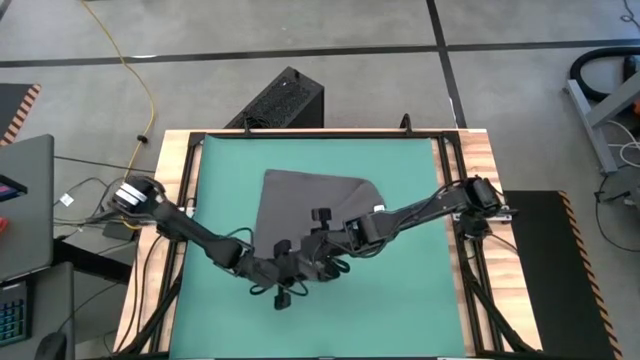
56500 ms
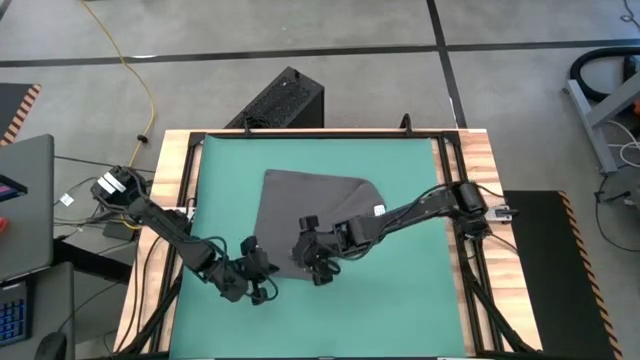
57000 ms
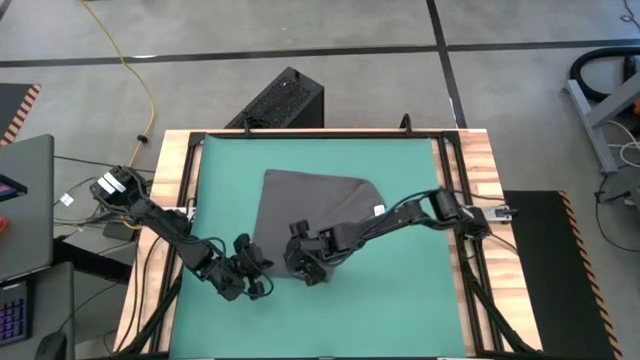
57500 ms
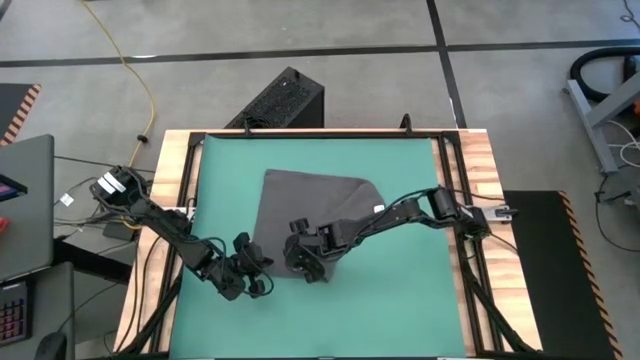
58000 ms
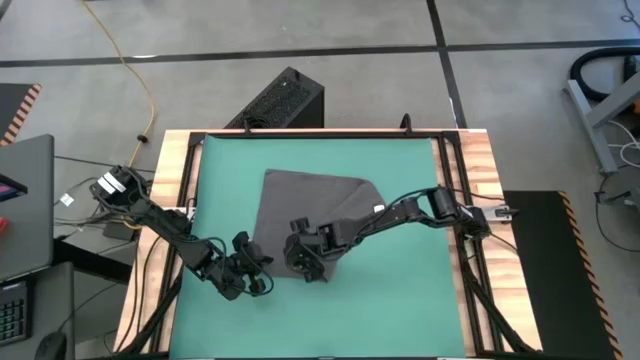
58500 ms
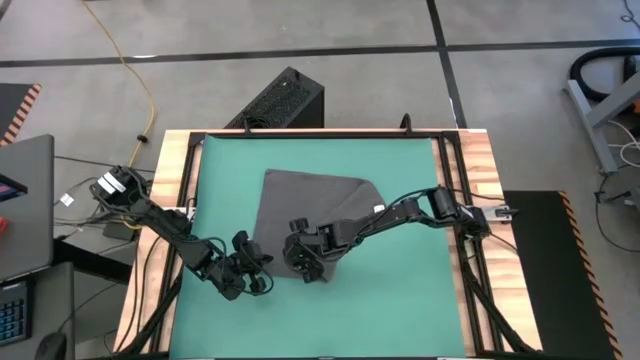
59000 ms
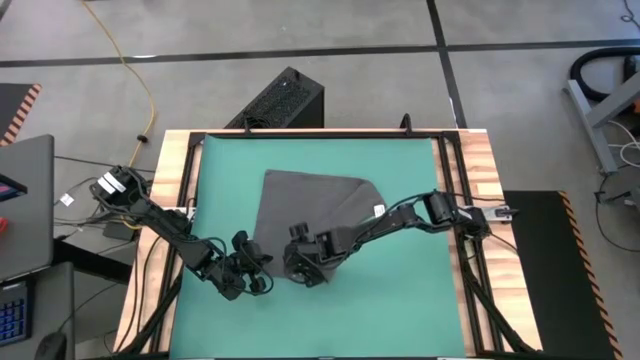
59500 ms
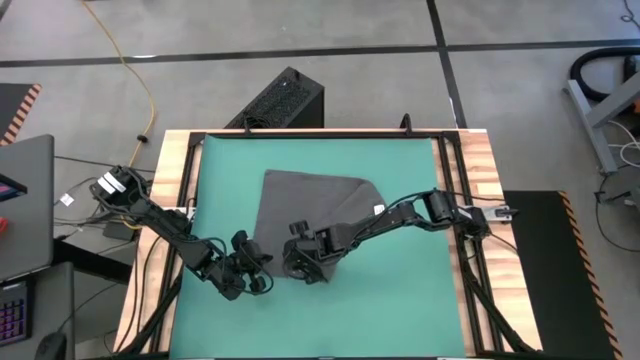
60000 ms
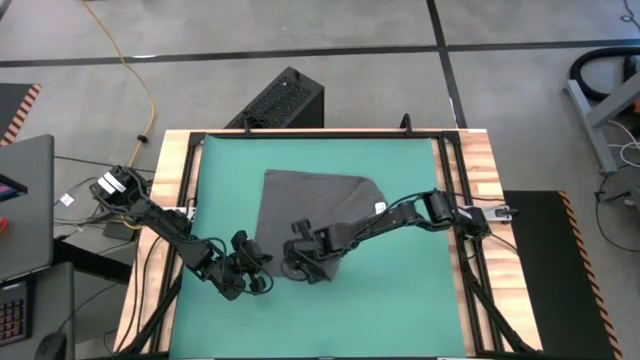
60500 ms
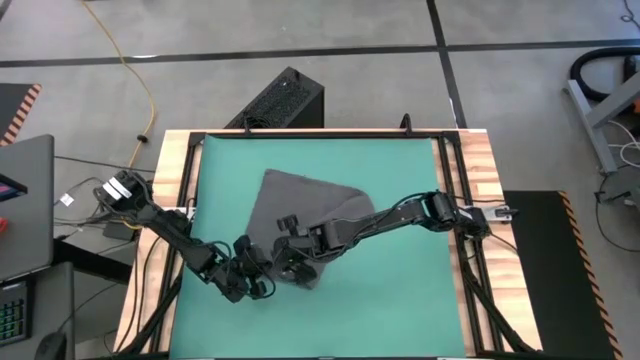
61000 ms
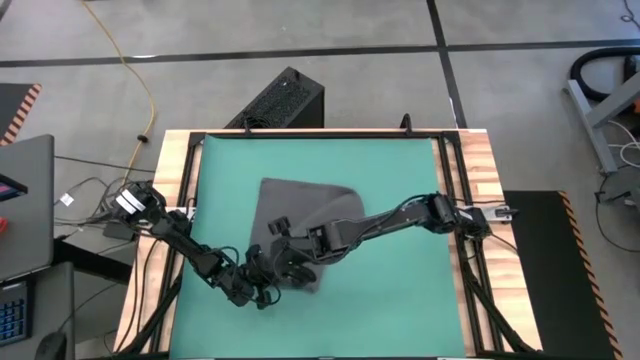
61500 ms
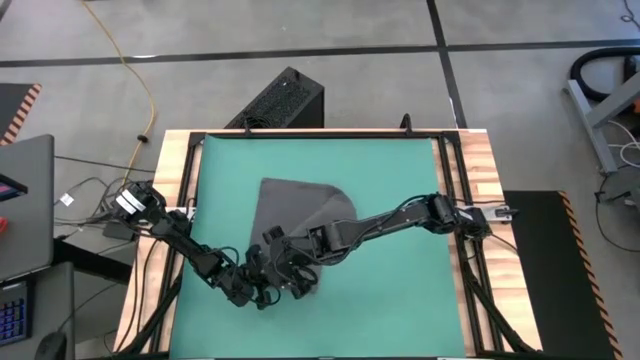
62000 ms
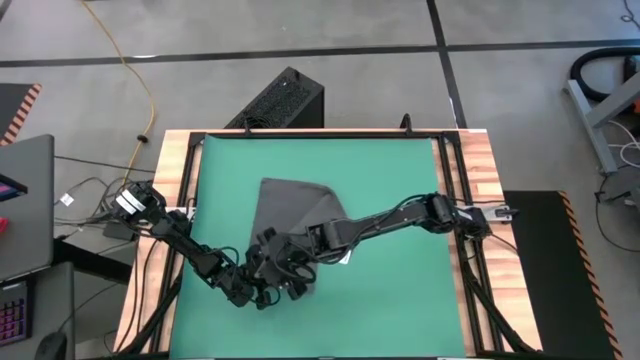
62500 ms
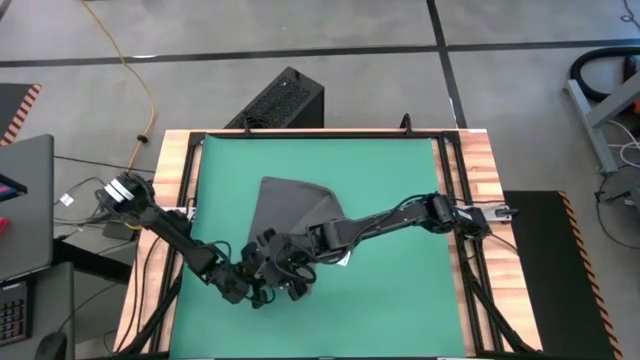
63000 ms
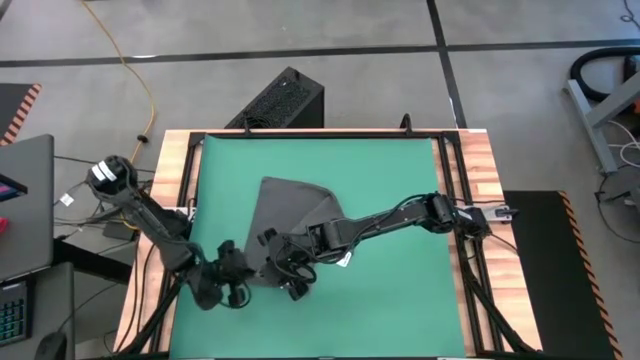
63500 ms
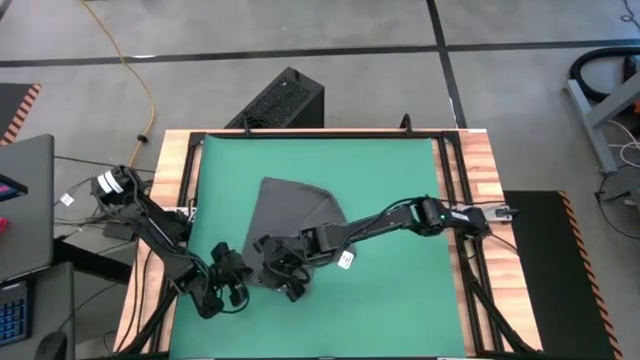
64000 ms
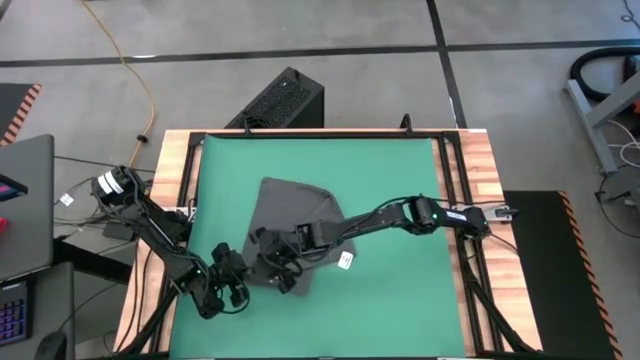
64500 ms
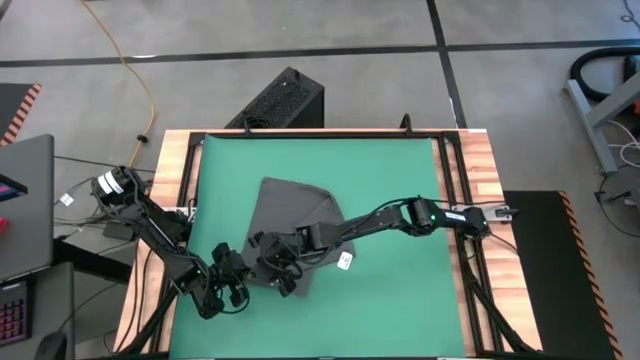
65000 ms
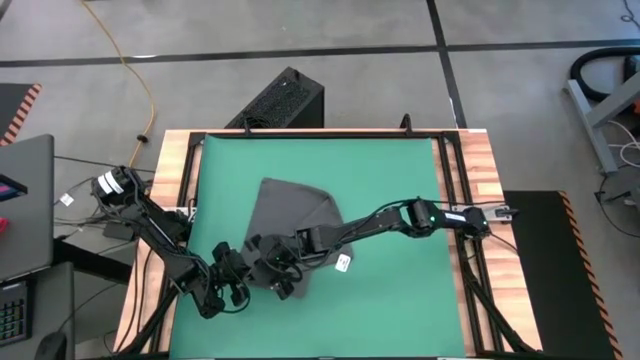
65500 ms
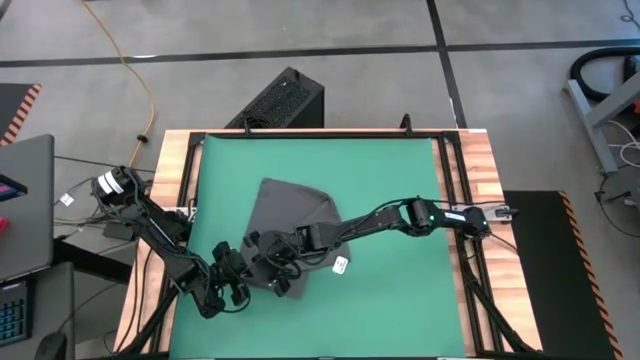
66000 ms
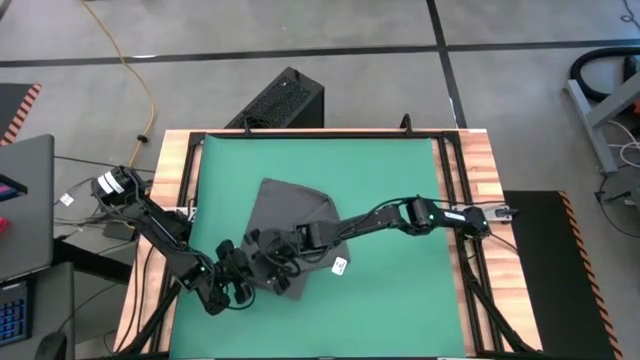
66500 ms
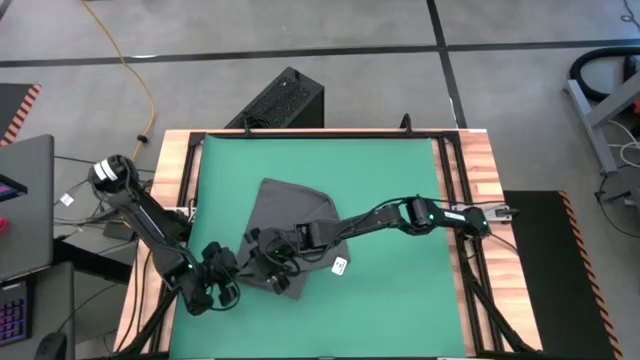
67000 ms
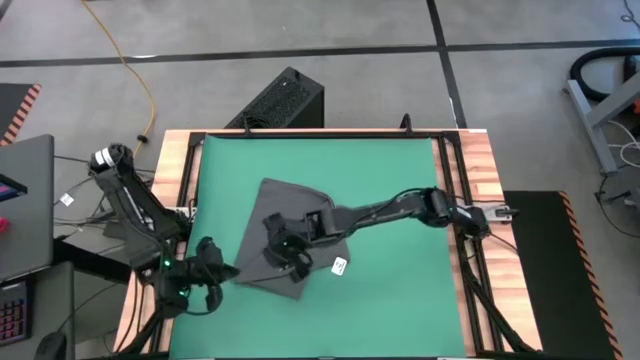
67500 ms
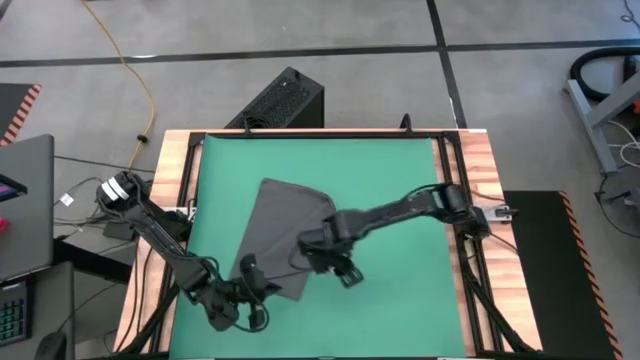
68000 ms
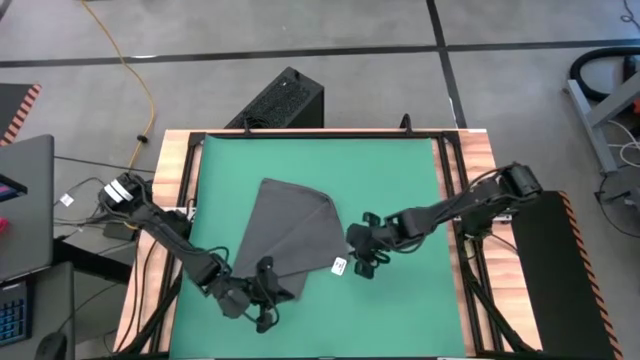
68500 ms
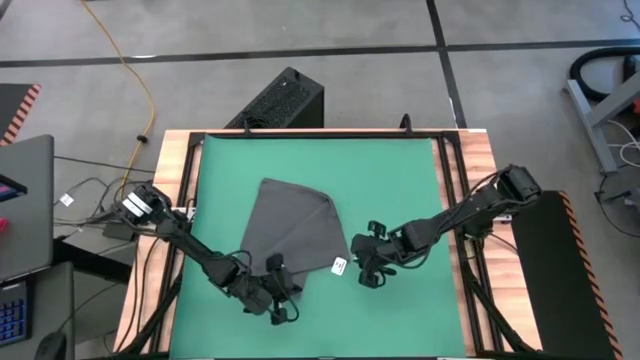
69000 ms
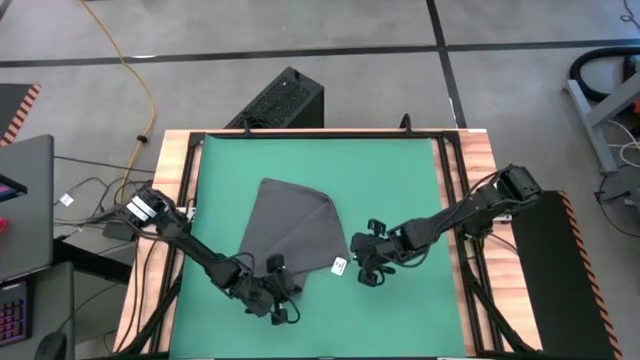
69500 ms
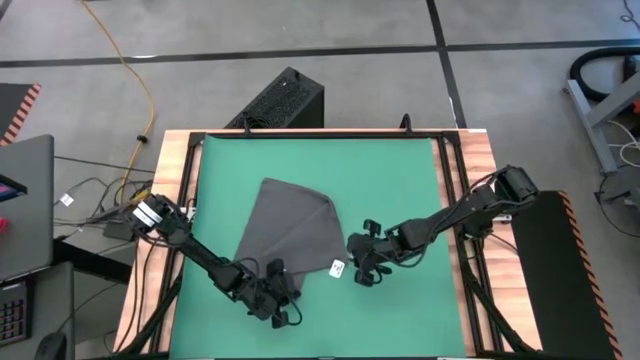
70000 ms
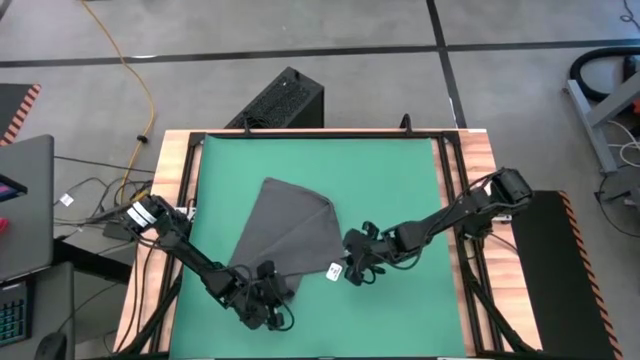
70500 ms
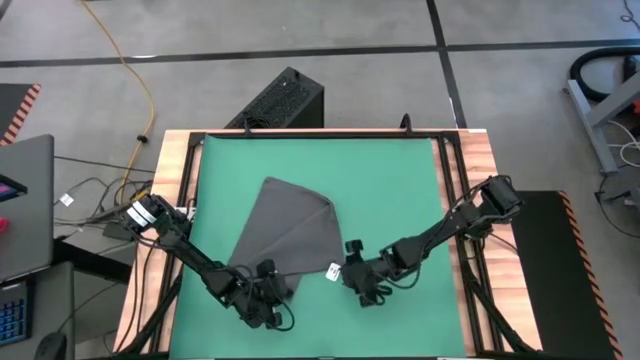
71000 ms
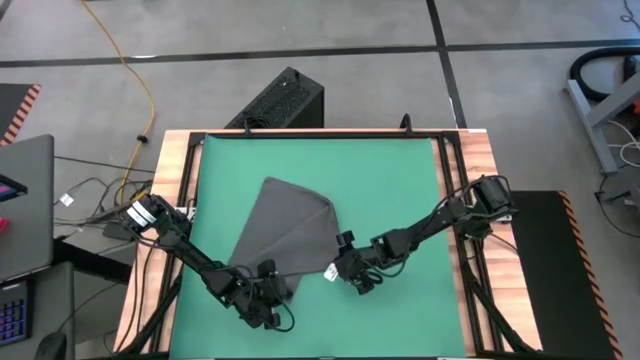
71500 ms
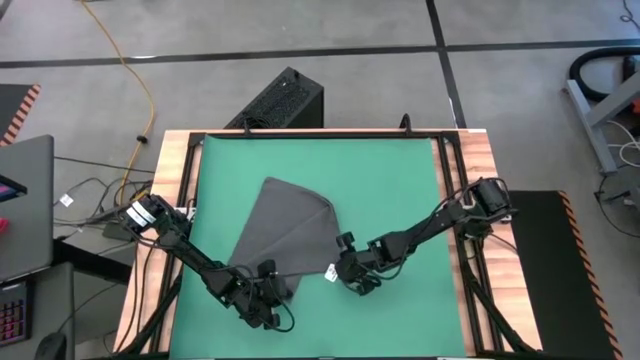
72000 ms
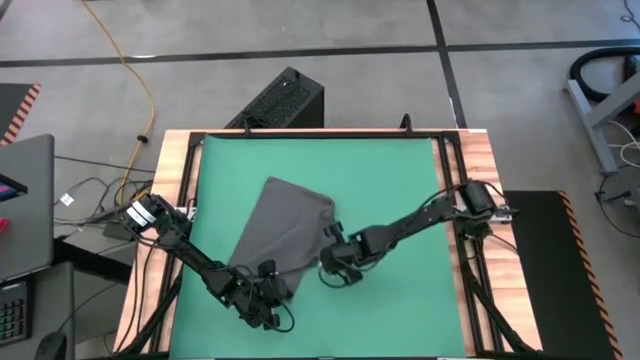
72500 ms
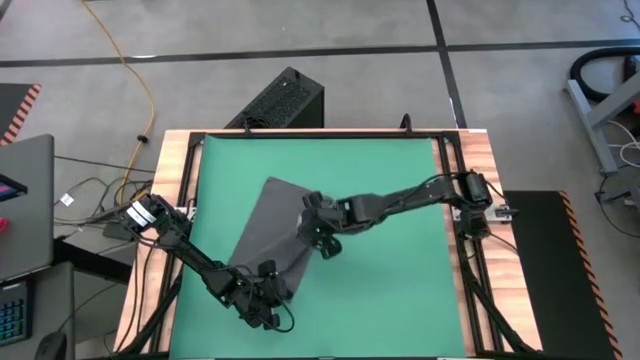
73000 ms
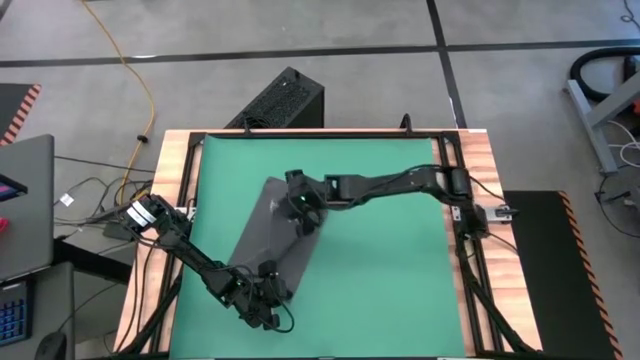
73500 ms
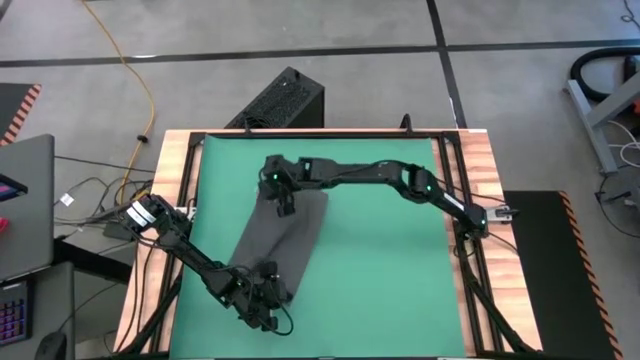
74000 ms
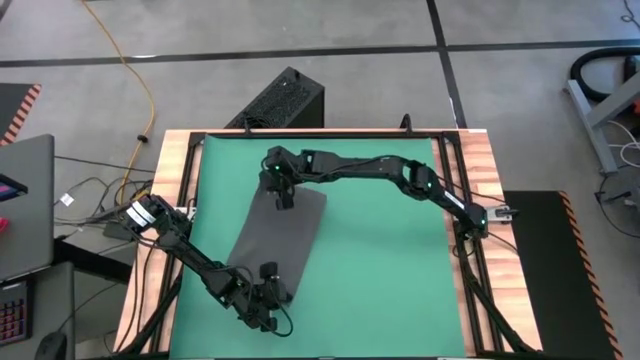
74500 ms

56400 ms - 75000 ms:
Task: Roll towel
Fold the gray towel
